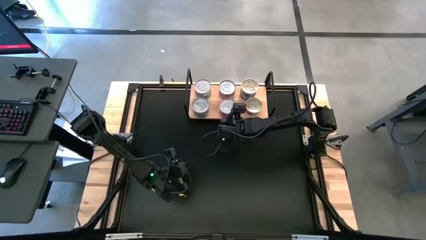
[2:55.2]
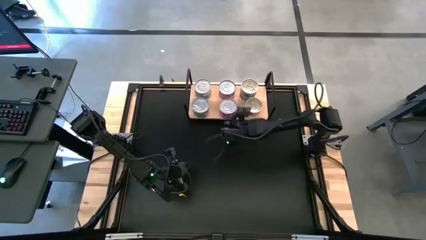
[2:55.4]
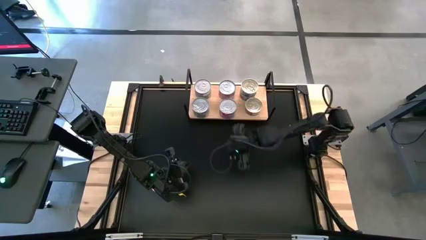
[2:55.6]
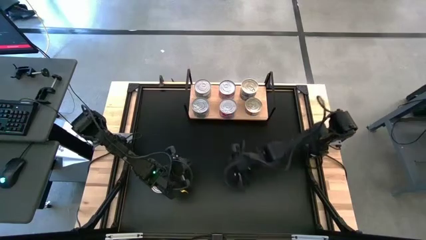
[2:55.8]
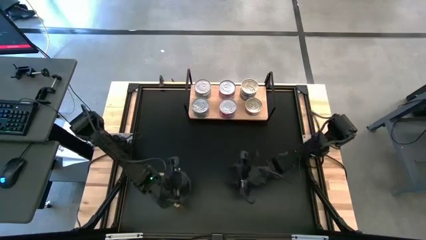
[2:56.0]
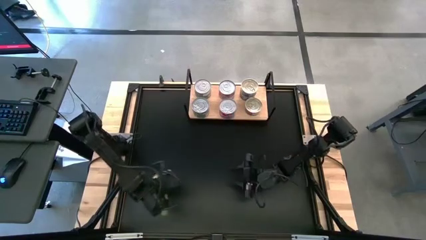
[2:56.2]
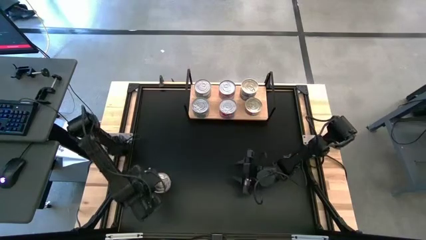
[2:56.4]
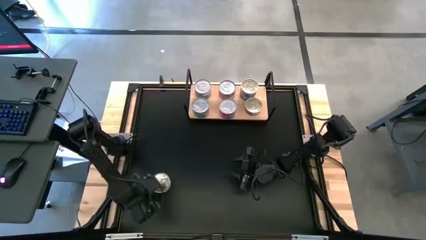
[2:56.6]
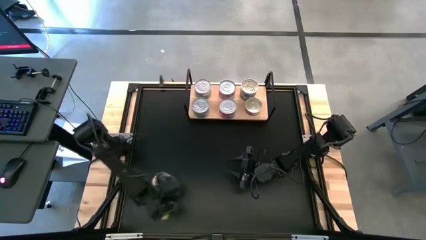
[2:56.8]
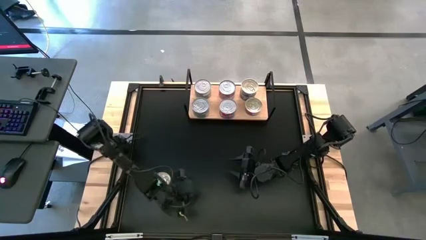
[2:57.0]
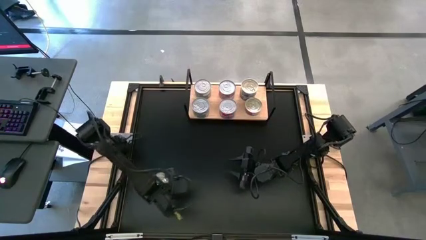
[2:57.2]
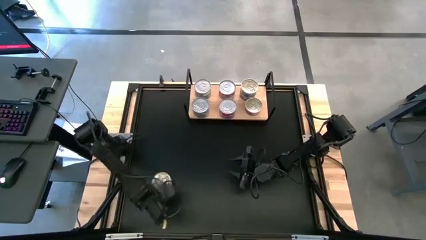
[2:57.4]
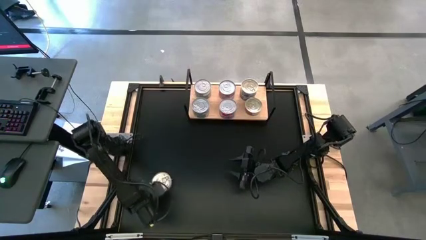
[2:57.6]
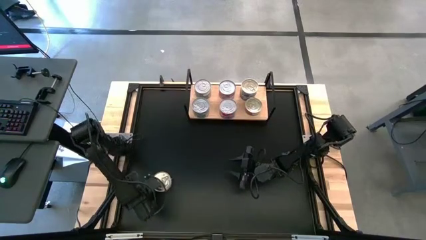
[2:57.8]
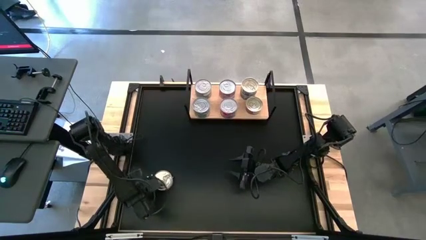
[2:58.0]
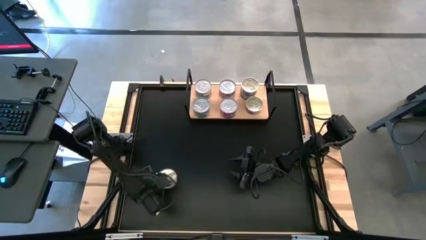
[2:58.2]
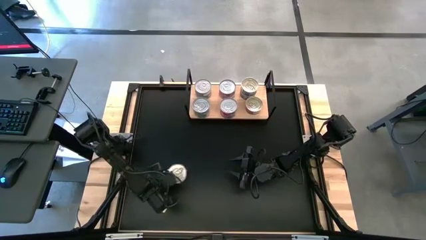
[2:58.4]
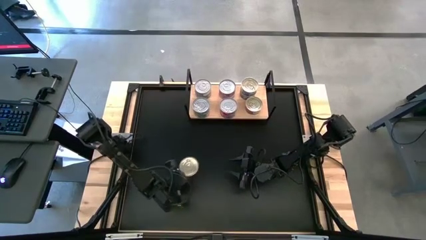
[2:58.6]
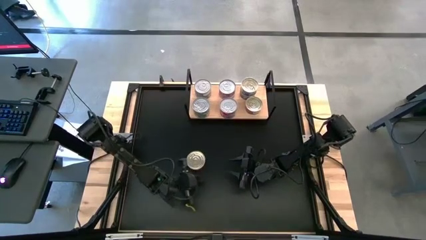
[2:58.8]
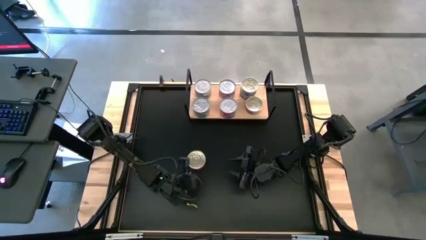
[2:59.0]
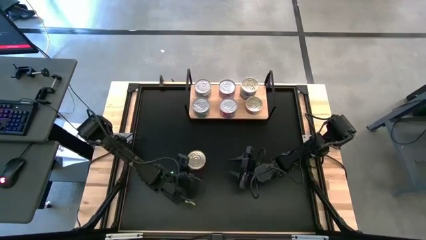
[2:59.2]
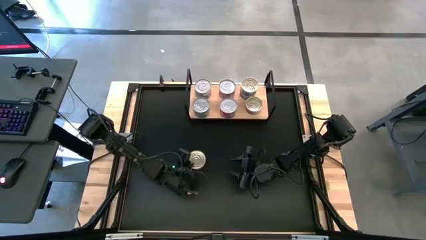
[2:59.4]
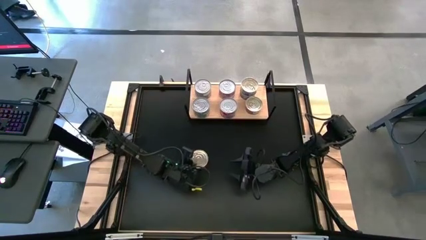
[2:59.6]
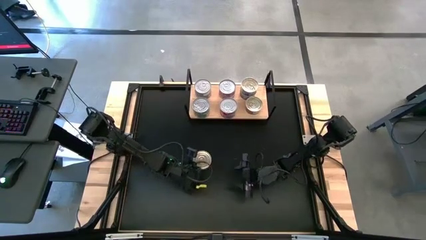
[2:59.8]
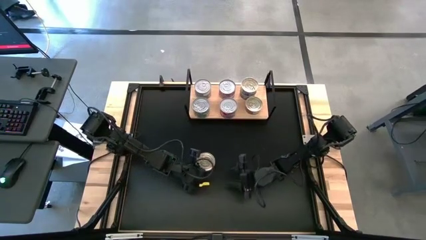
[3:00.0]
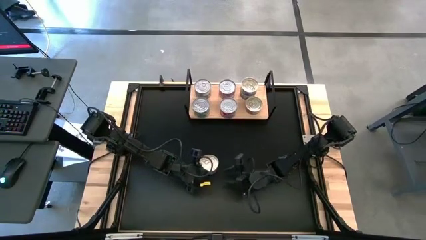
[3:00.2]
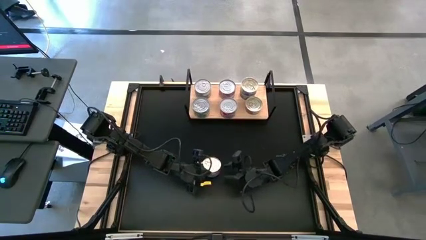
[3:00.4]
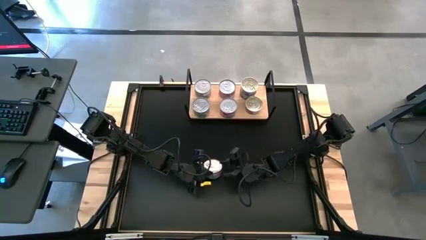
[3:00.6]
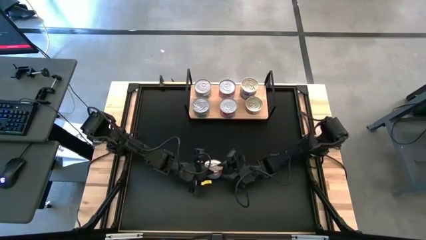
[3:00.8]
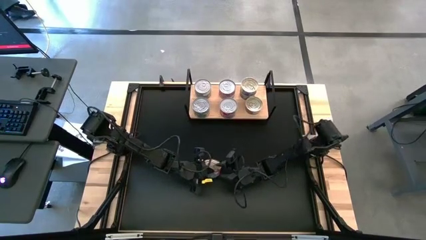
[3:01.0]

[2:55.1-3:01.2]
Task: Stack canned seafood by type on shelf
Stack the blue tuna can on top of the blue tuna can on the shelf

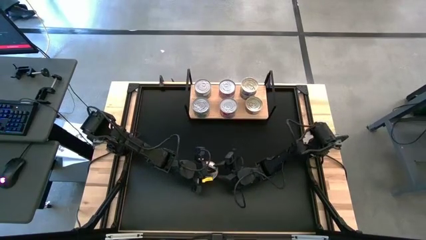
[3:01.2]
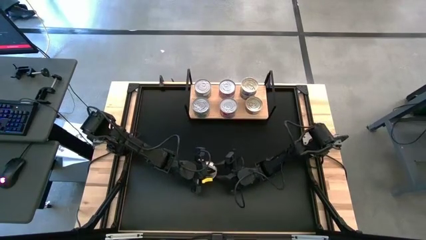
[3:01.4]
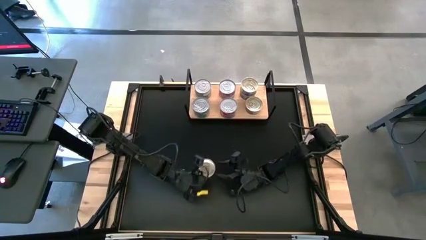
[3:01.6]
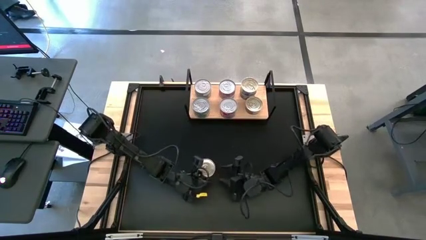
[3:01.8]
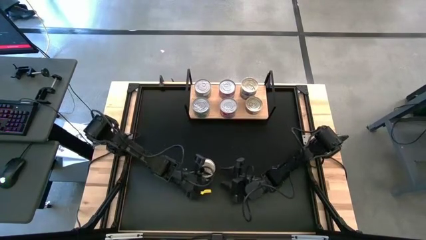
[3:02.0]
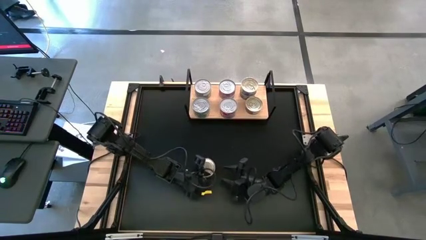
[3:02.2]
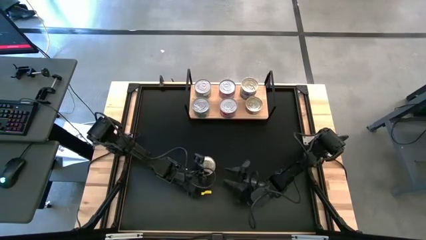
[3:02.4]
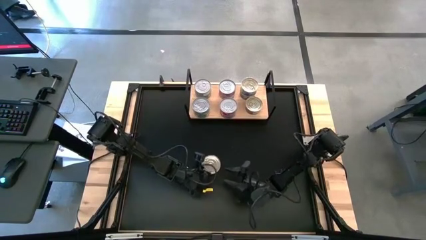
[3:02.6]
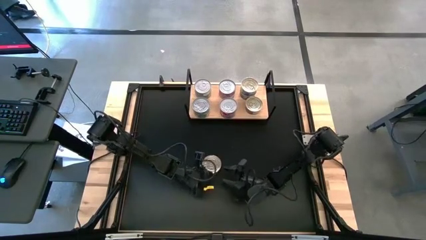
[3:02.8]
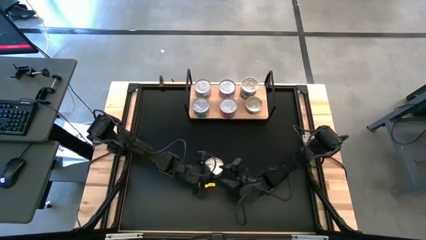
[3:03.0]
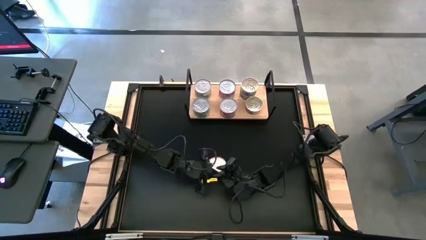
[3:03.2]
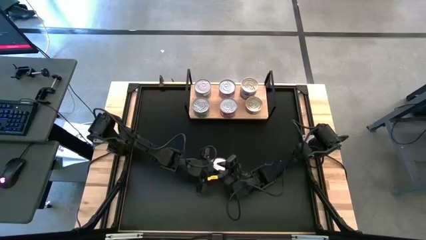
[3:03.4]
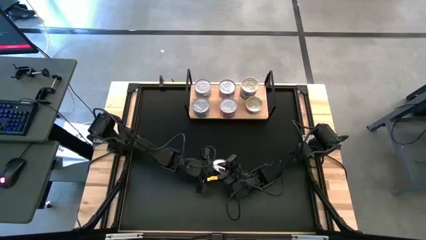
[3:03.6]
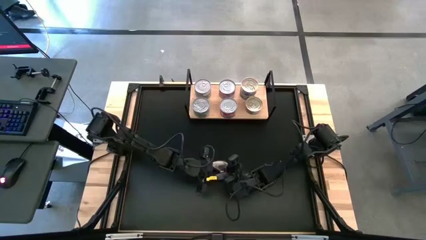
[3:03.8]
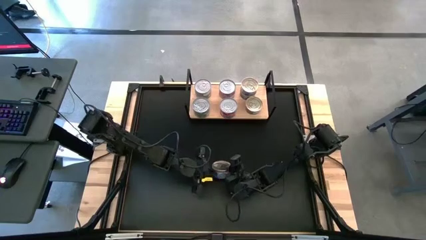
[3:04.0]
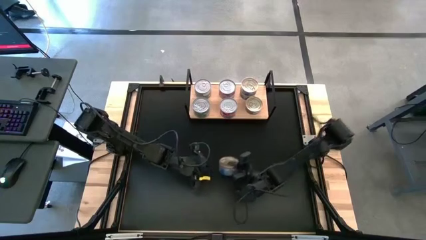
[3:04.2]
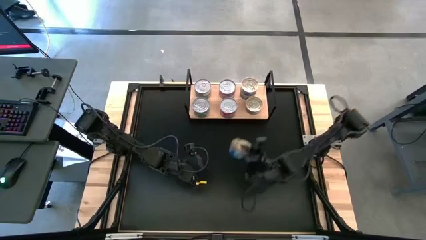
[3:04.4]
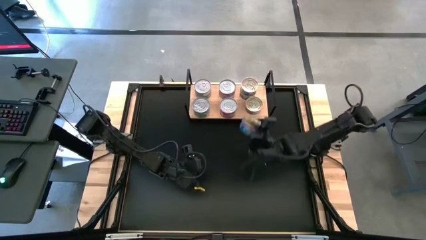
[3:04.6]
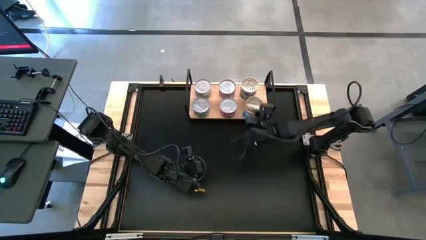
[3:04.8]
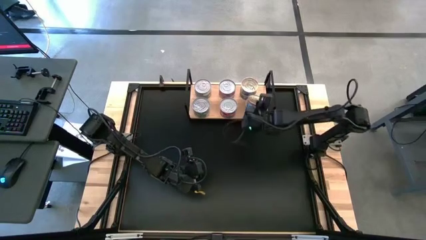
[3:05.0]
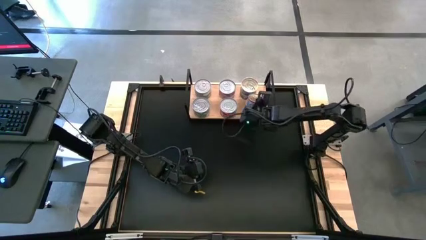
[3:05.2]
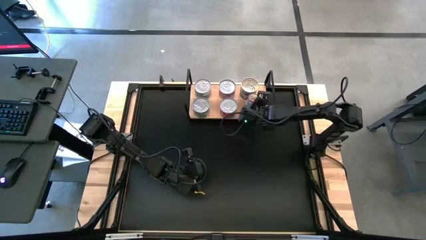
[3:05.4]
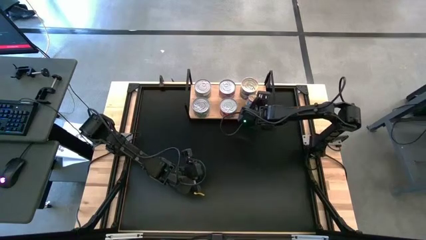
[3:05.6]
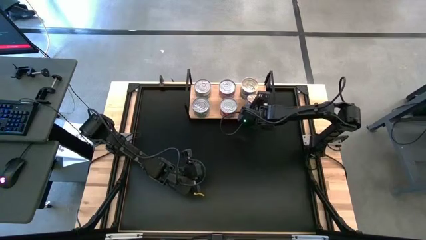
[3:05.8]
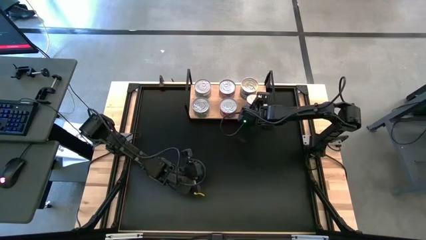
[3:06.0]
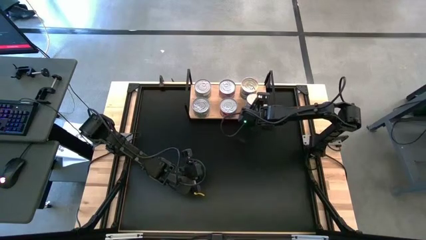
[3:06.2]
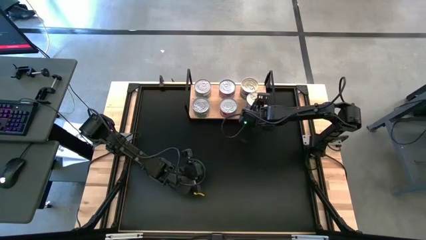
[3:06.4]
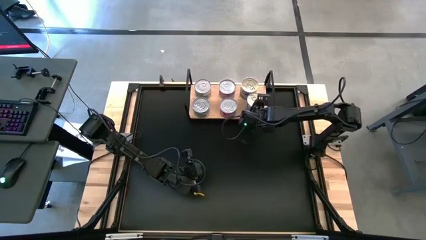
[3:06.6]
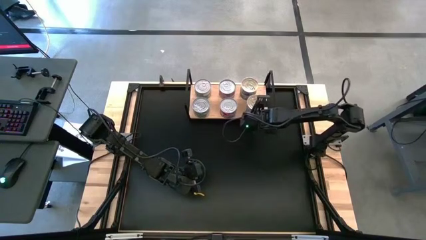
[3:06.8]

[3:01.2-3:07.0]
Stack the blue tuna can on top of the blue tuna can on the shelf

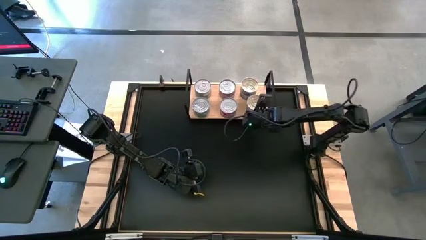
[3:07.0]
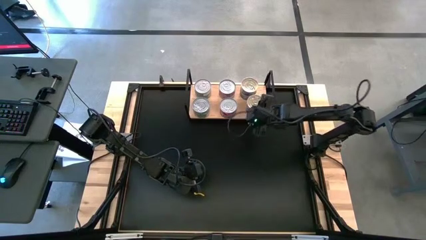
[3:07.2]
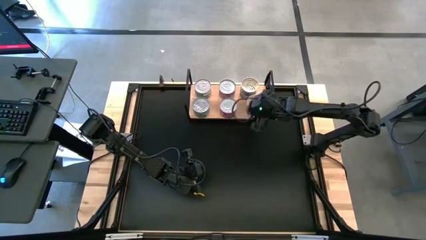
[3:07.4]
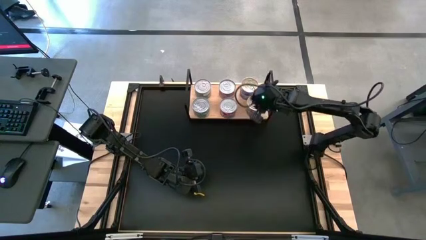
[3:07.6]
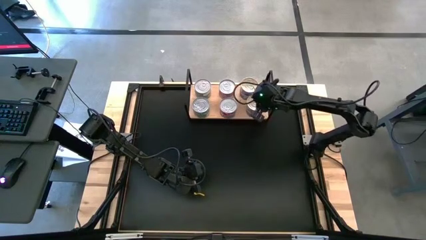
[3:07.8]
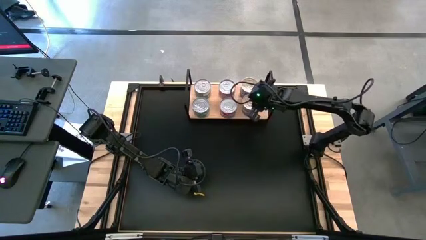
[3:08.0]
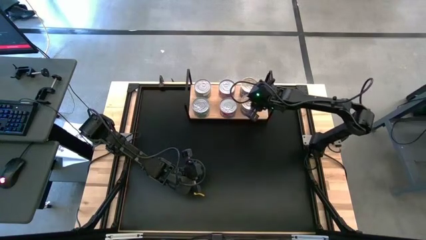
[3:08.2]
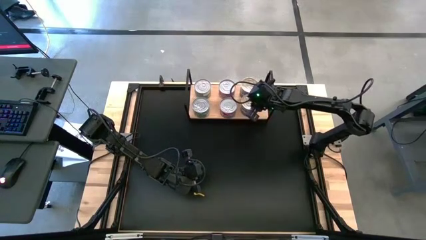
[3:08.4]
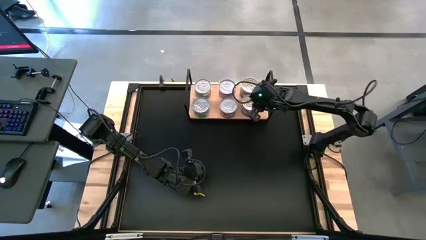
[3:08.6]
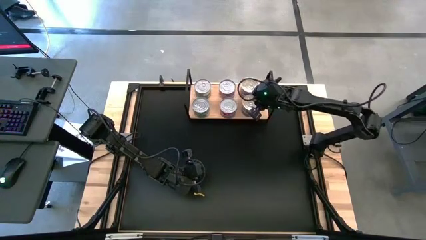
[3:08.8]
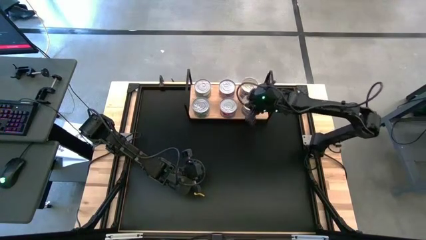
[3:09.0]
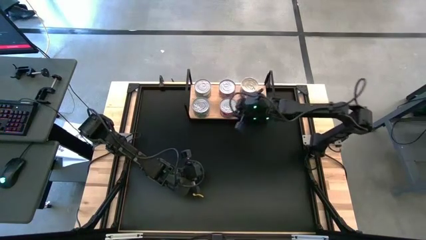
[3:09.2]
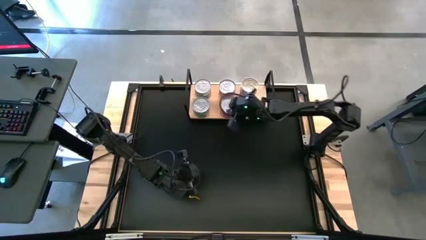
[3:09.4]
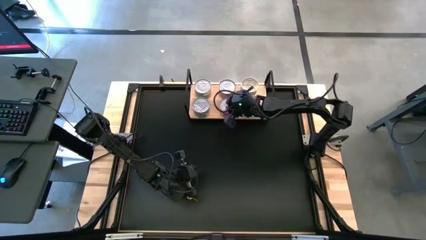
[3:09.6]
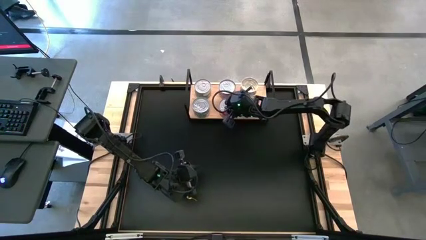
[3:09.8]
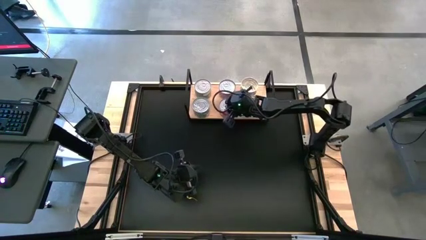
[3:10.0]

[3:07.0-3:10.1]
Adjust the stacked tuna cans on the shelf
